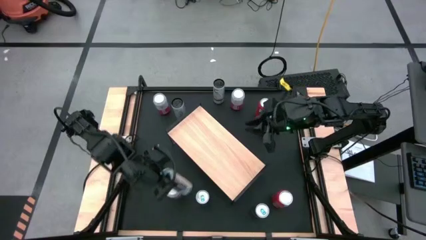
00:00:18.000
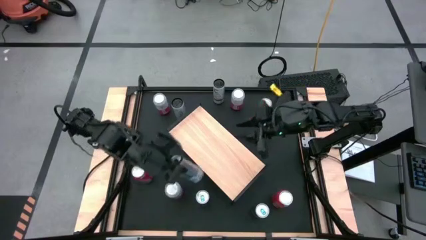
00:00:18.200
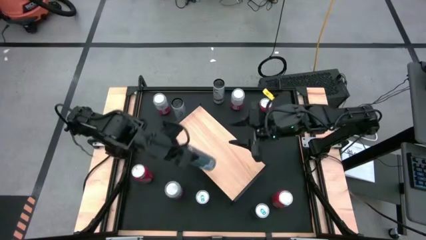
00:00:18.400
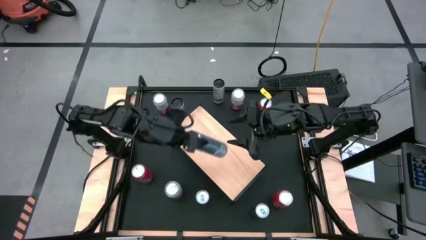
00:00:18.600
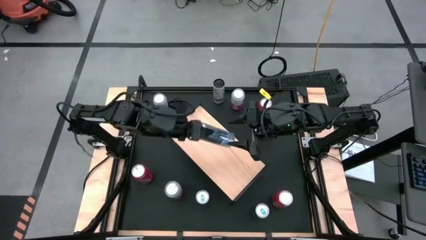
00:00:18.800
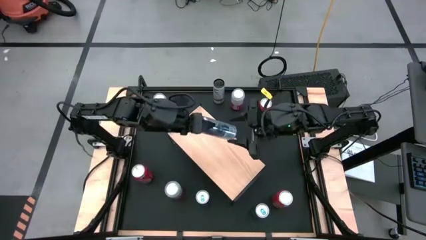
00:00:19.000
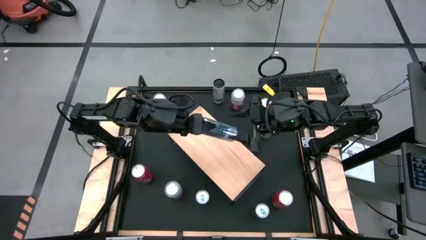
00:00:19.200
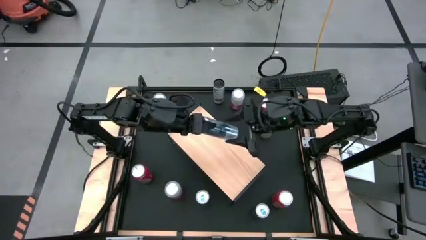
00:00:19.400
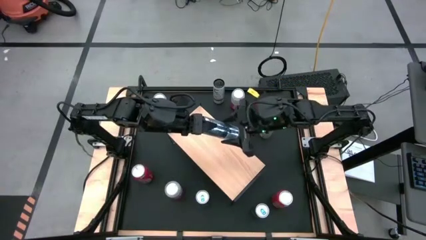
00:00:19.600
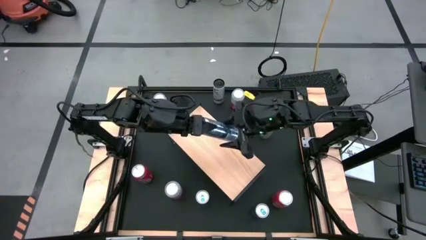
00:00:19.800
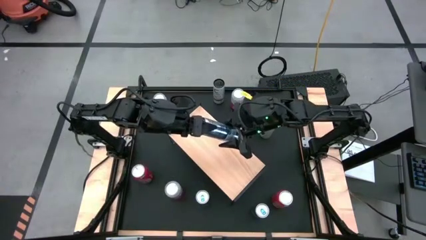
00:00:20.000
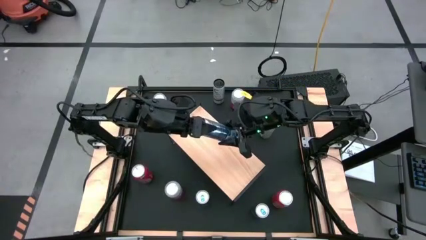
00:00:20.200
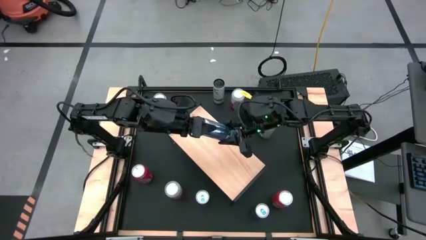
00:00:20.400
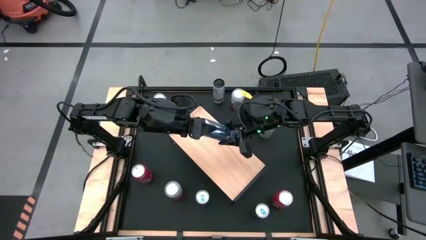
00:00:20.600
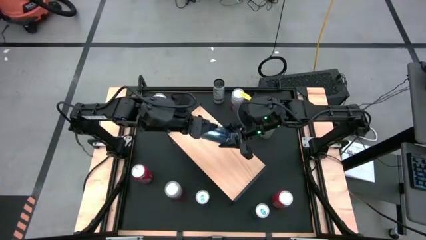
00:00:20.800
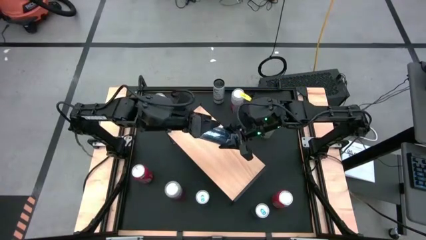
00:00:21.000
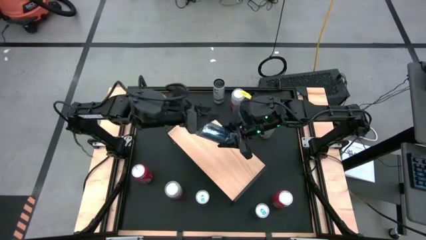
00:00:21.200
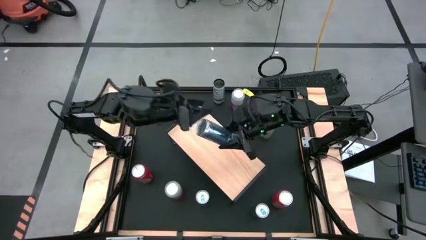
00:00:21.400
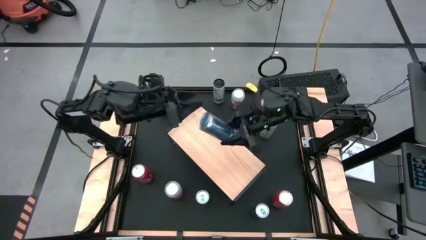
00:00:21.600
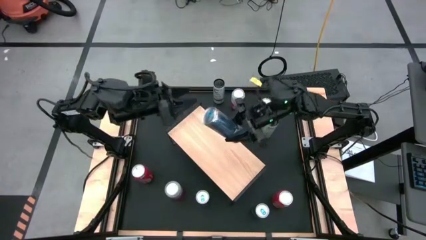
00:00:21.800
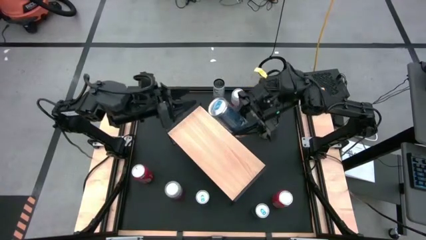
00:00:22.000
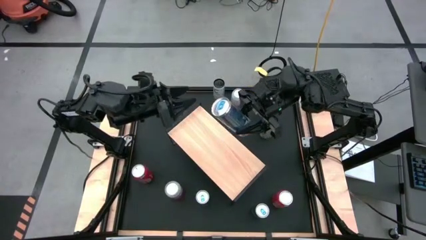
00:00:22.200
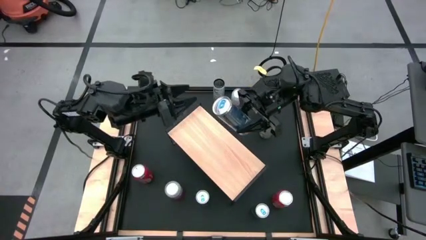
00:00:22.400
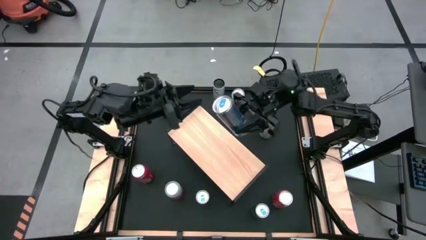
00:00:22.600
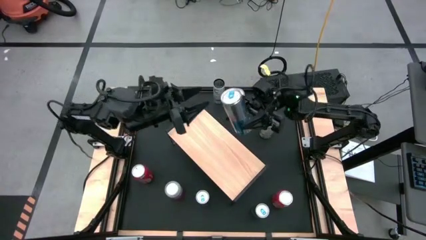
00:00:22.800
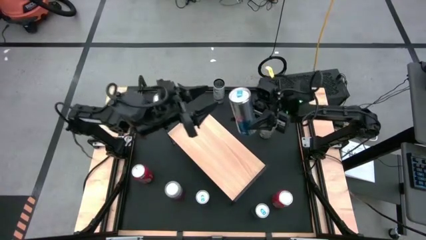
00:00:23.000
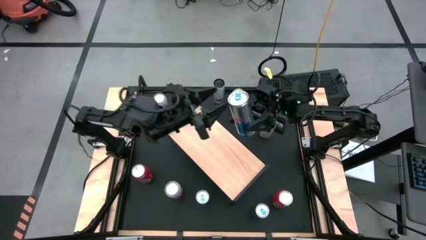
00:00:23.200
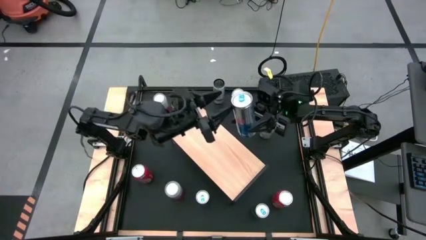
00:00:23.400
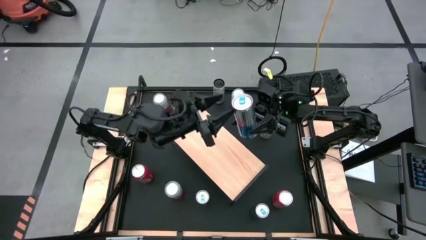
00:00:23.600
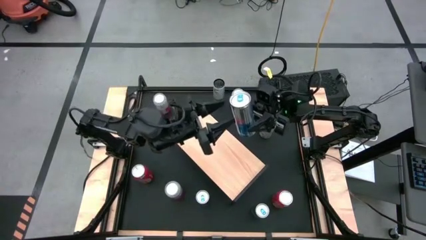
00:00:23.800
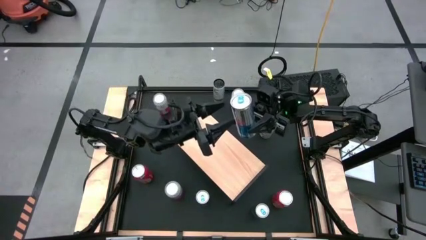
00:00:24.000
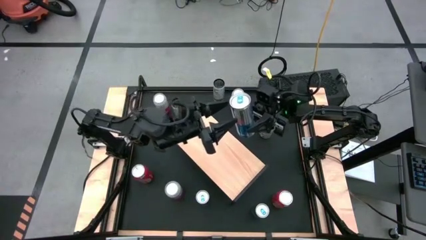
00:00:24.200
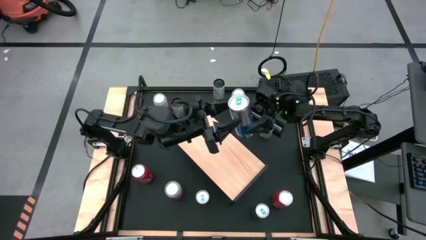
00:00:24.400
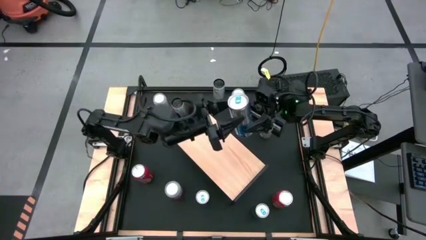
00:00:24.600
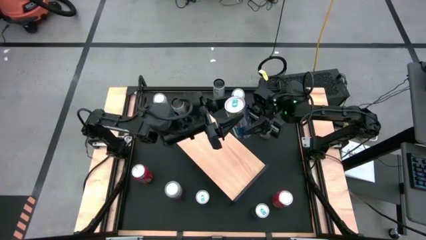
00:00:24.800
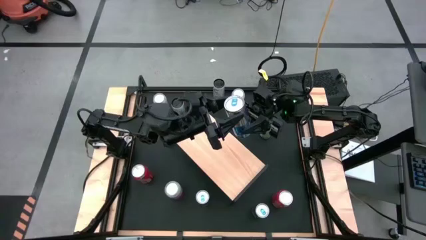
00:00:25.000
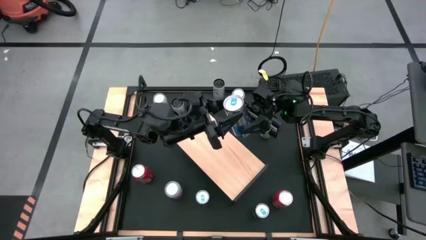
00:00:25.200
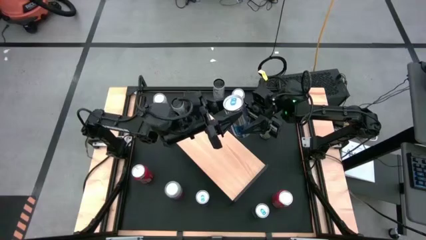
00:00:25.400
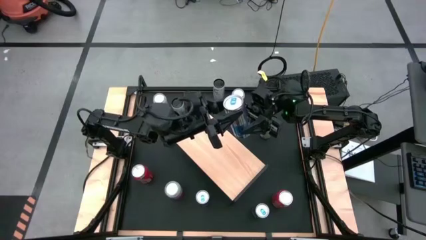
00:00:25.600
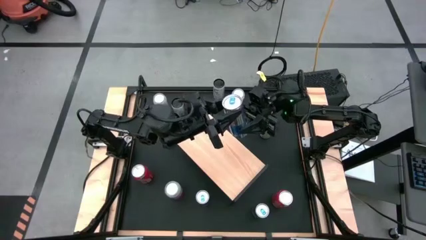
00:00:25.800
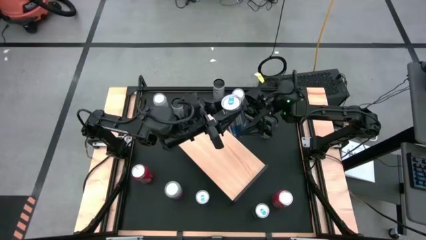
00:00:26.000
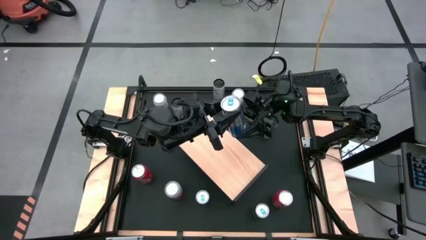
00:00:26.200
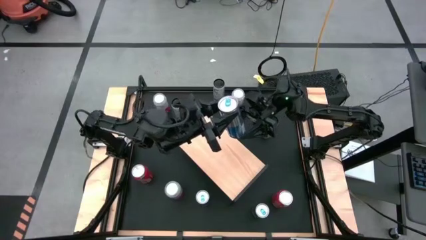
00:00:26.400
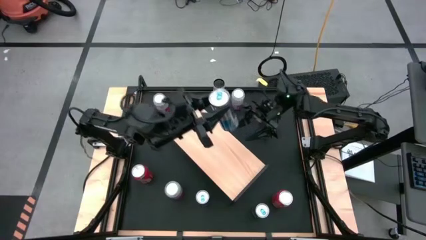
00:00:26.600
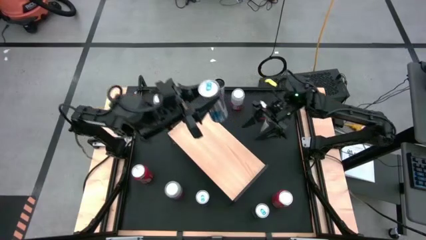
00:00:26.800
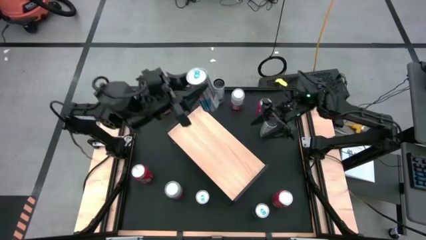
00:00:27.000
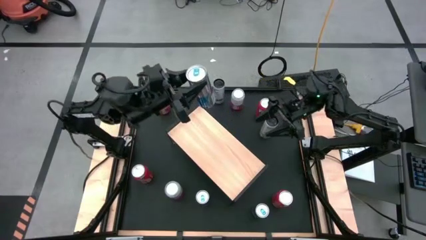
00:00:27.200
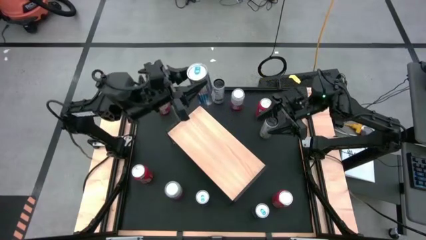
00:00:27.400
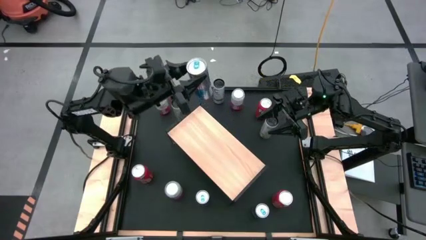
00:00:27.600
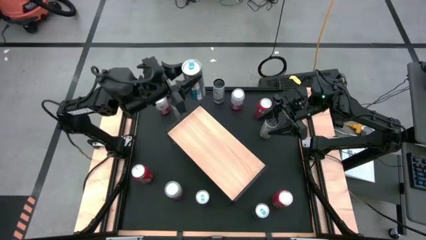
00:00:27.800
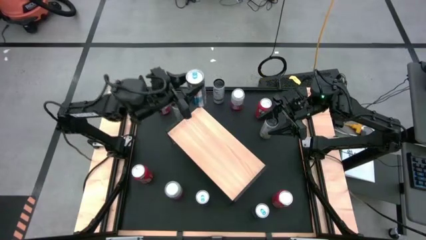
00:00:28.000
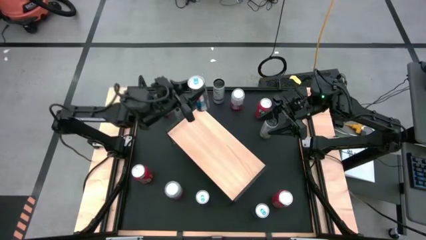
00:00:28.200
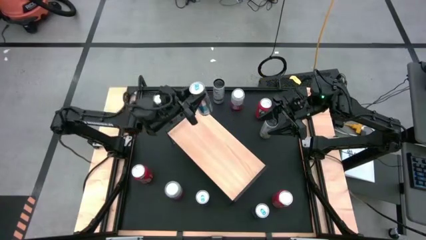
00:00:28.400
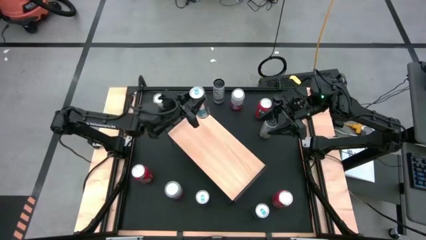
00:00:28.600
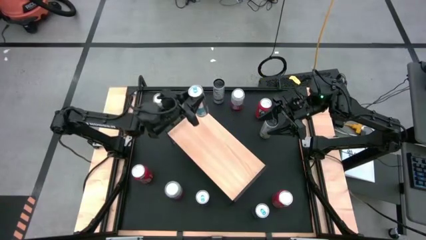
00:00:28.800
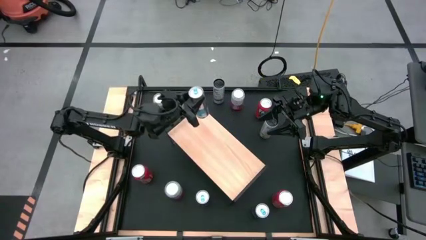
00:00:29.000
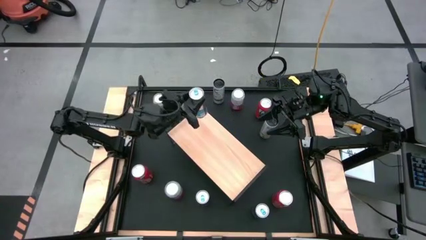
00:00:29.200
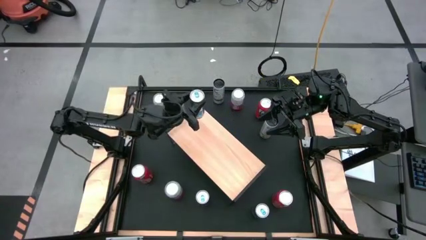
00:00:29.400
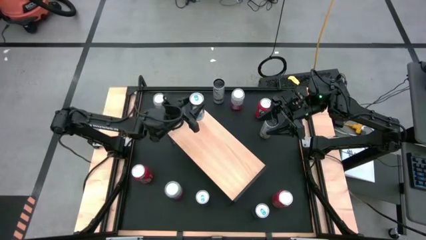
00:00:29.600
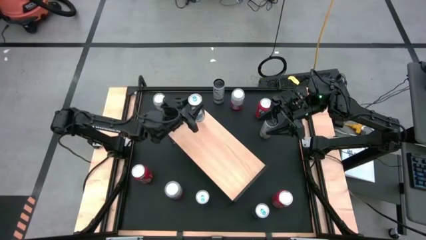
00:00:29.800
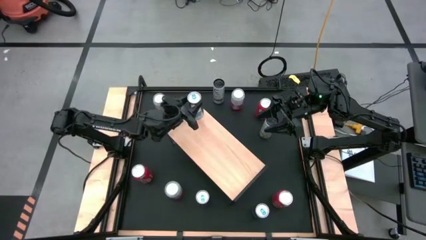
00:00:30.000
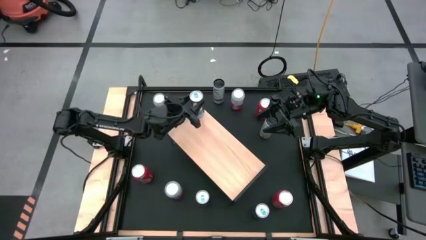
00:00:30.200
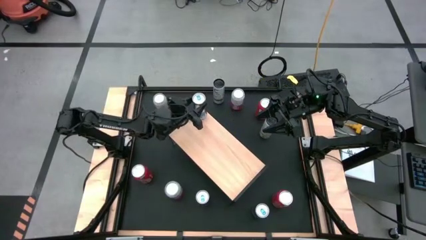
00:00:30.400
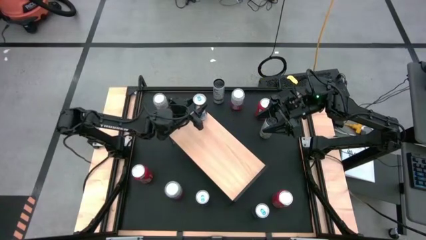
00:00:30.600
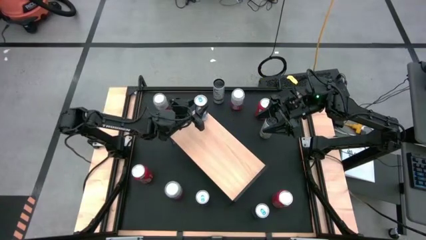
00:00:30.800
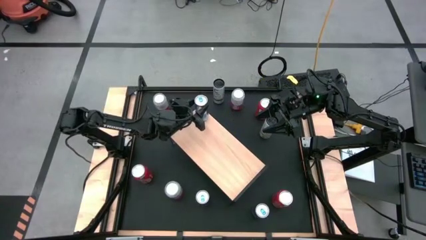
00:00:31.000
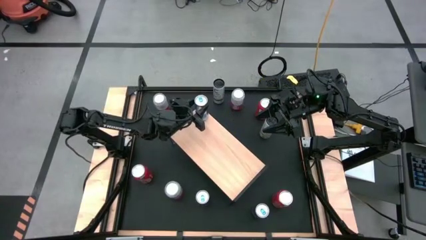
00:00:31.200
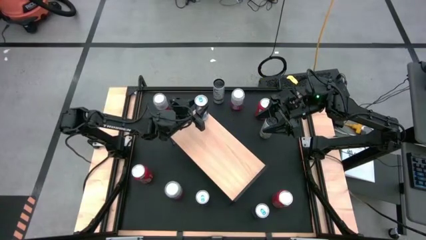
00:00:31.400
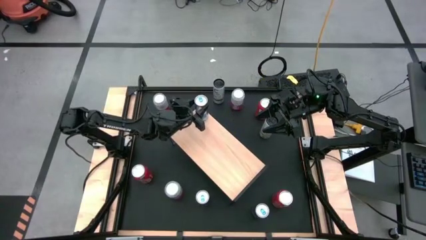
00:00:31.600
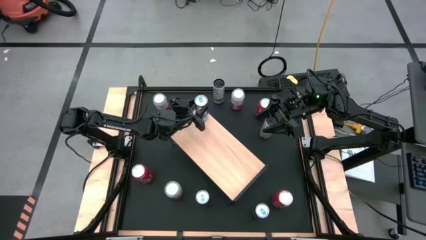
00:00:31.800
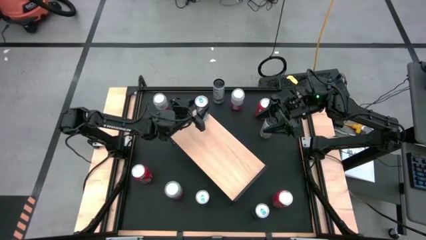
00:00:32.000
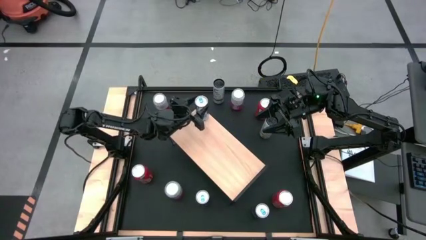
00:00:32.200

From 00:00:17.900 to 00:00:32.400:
Task: Place canned beverage on shelf
Put the bottom left blue soda can on the shelf
